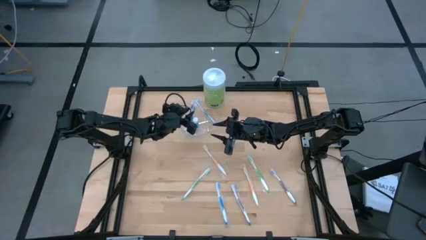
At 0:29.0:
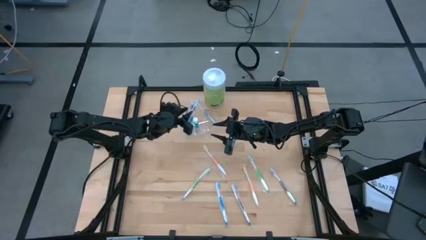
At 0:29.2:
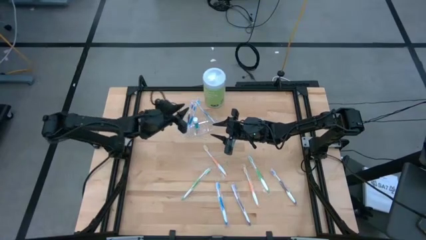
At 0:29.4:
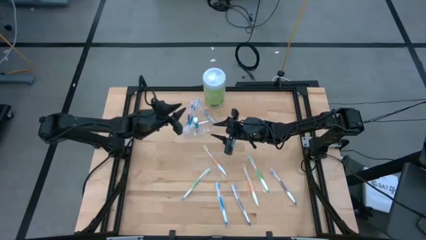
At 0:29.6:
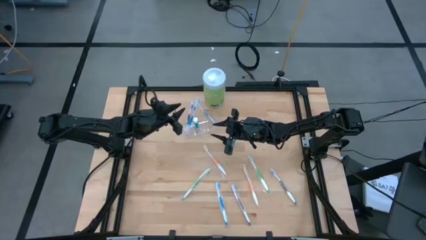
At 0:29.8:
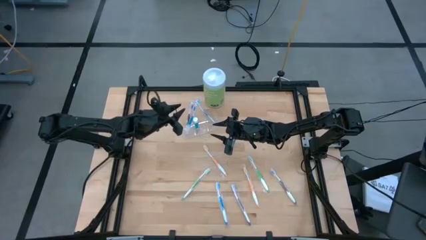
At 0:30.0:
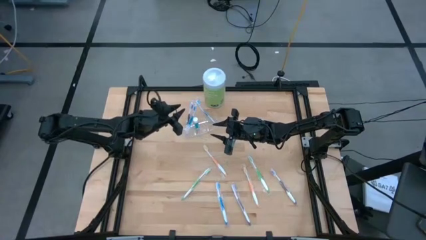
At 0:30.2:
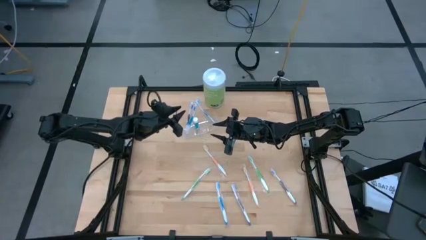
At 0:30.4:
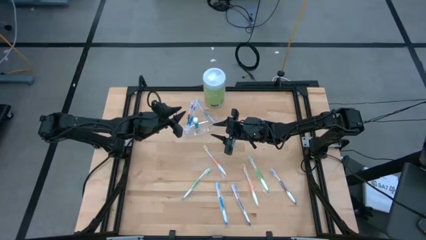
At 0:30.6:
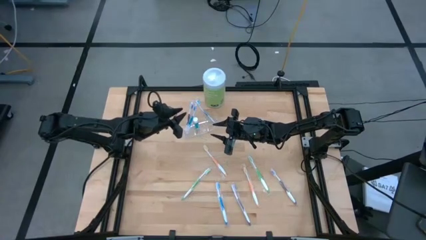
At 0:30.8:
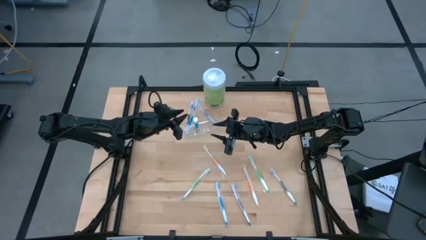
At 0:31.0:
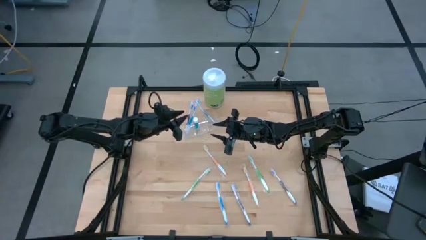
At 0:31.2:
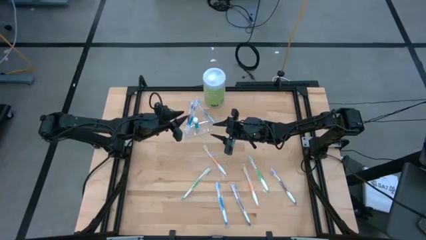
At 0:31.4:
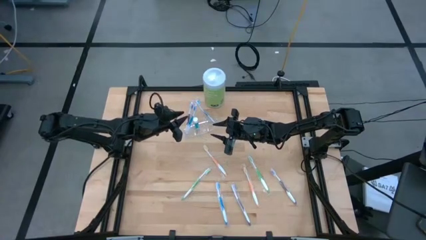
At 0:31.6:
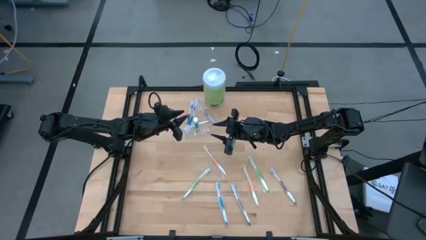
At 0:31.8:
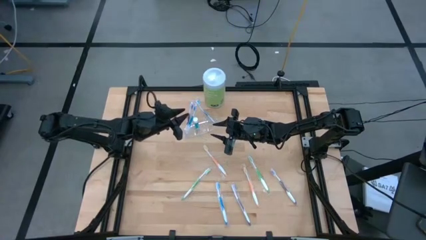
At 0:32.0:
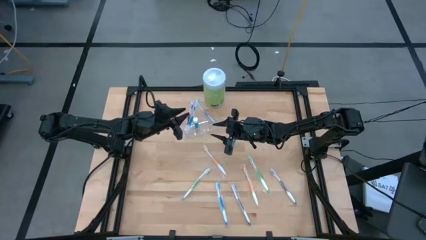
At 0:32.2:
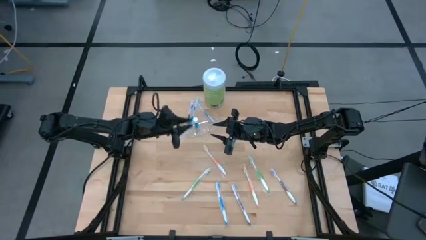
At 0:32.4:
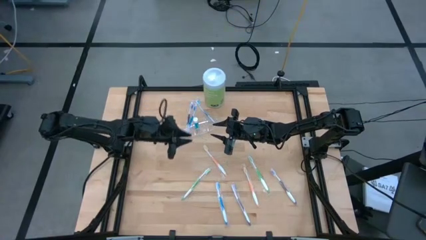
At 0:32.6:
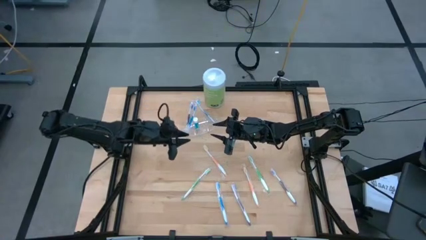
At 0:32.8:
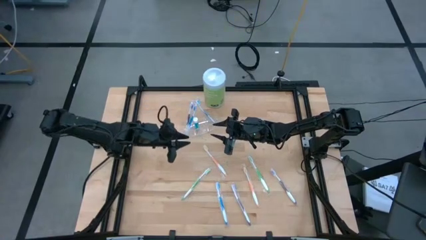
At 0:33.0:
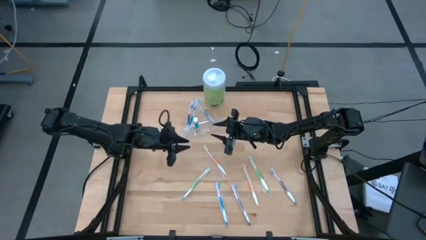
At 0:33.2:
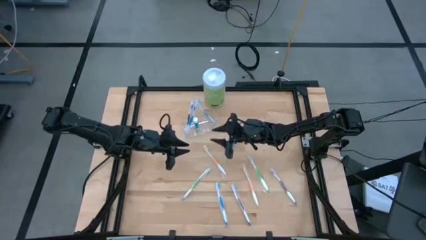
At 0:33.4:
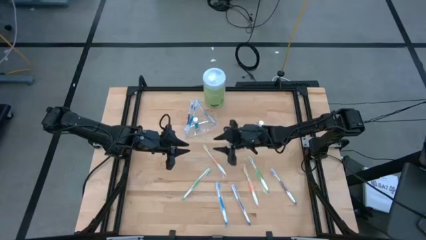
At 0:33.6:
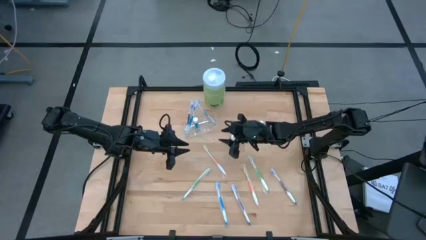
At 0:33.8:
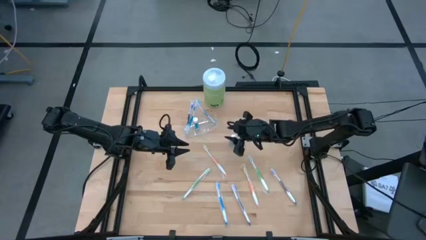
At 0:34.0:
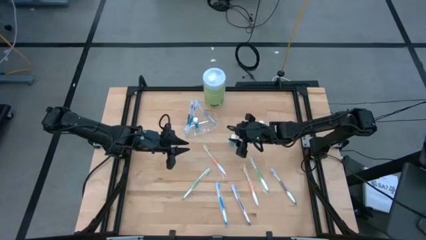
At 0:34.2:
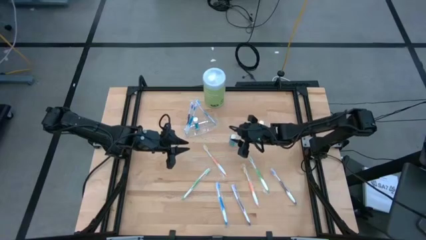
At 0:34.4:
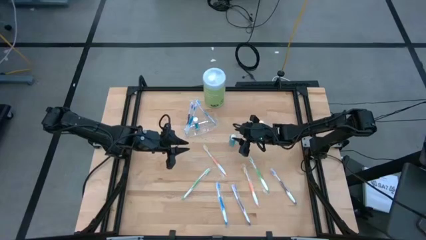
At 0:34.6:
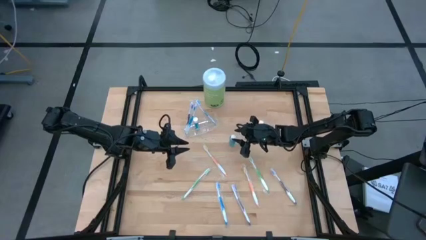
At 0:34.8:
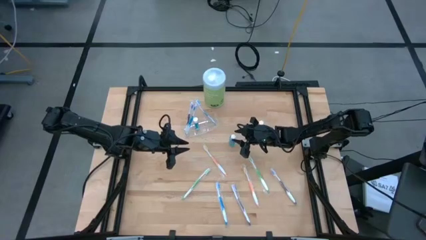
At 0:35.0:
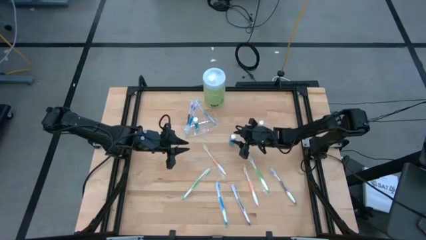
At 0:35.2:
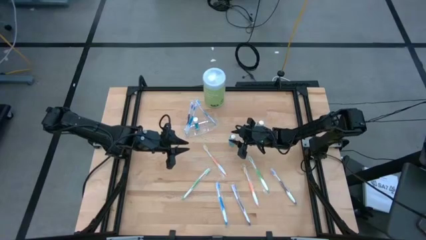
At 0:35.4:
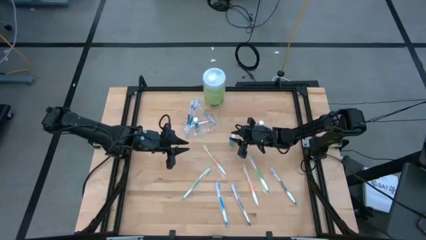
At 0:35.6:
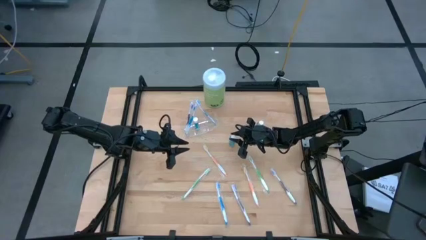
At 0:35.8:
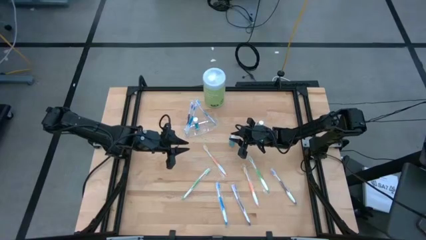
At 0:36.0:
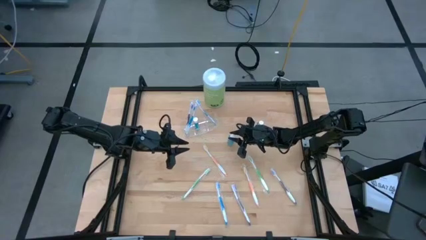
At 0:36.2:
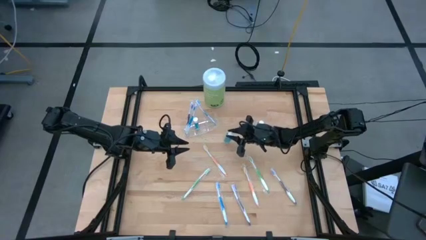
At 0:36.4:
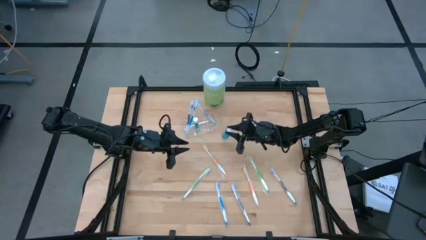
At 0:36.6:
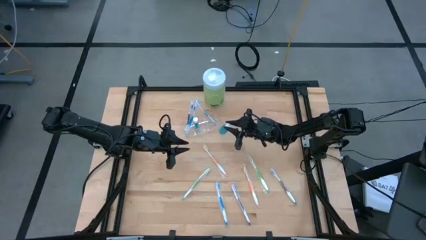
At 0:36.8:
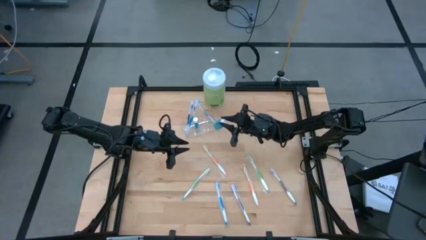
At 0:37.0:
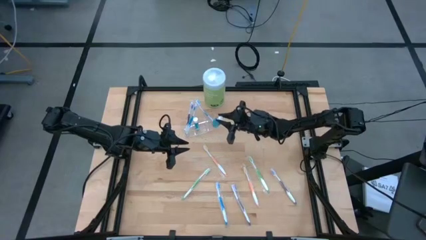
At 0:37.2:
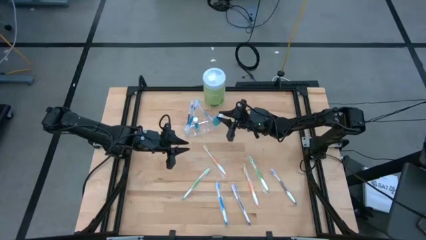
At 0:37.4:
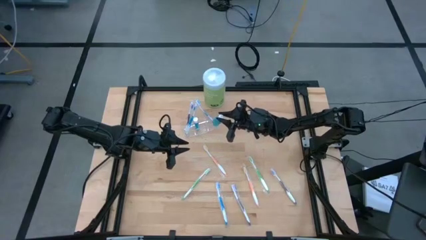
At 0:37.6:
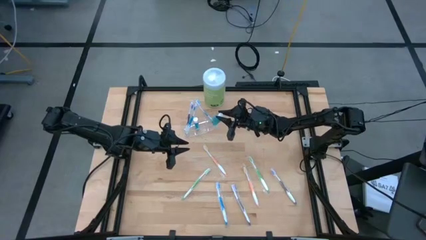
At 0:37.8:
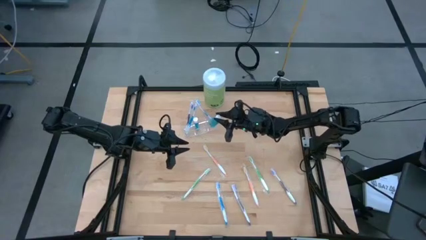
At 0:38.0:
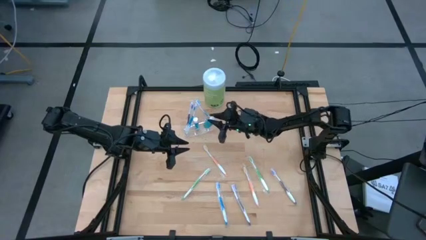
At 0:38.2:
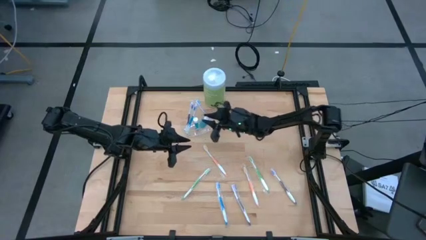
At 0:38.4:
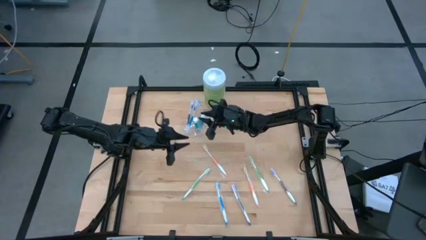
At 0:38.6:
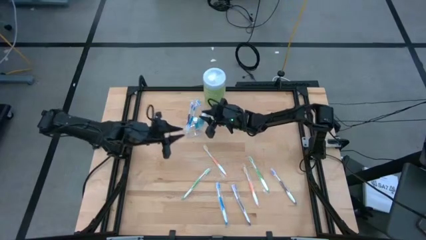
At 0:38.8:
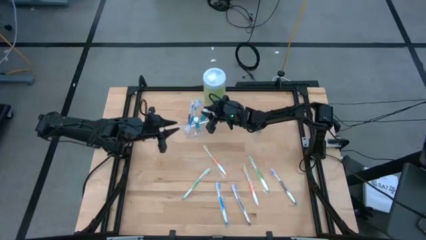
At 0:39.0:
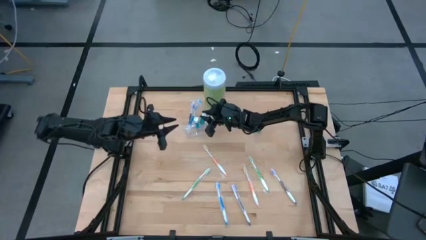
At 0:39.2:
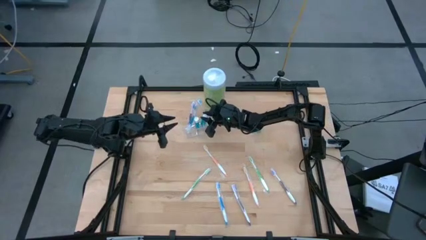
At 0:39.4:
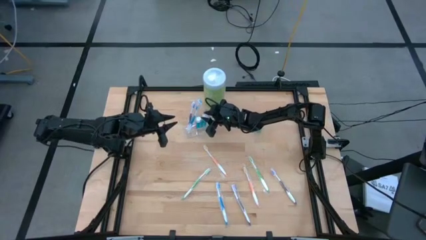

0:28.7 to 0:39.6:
Task: Pick & Place toothbrushing station
Put the bottom mouthwash into the transparent organizer

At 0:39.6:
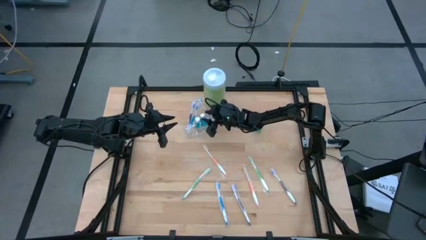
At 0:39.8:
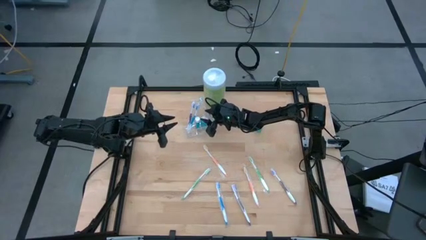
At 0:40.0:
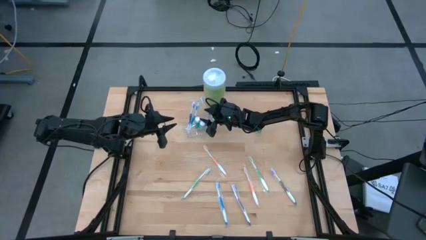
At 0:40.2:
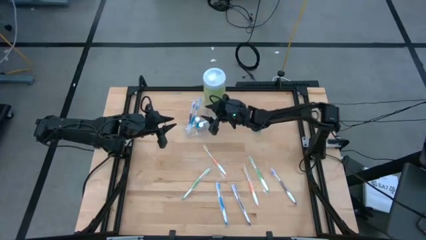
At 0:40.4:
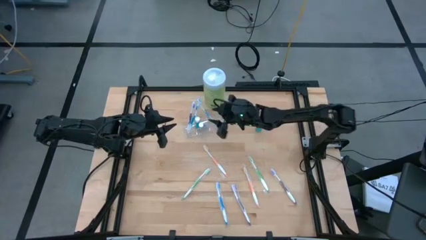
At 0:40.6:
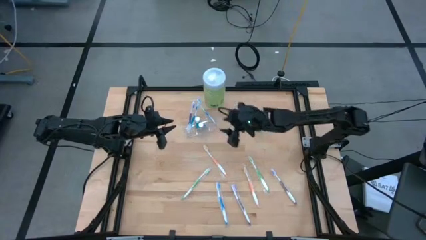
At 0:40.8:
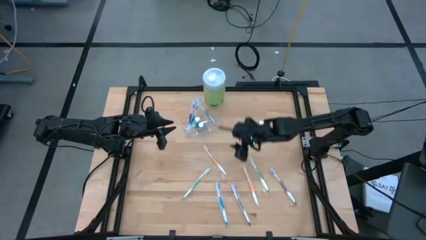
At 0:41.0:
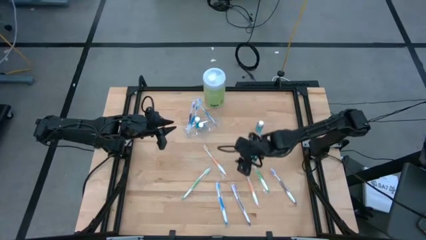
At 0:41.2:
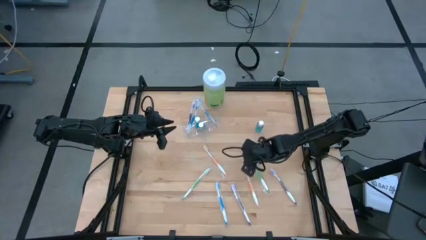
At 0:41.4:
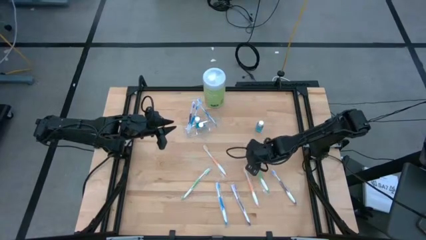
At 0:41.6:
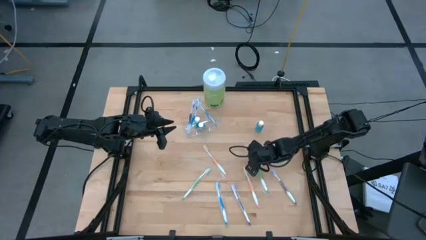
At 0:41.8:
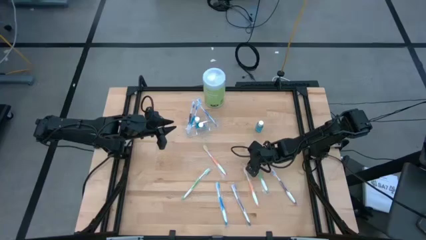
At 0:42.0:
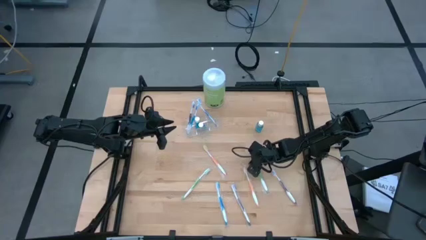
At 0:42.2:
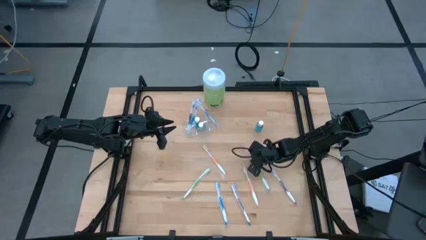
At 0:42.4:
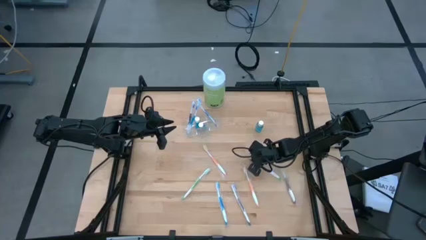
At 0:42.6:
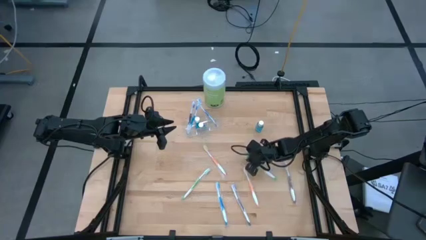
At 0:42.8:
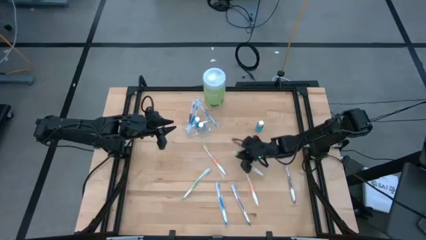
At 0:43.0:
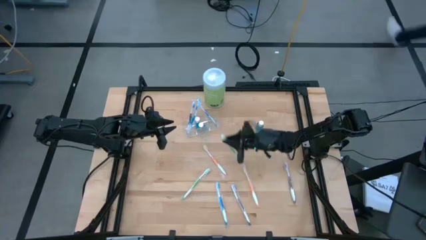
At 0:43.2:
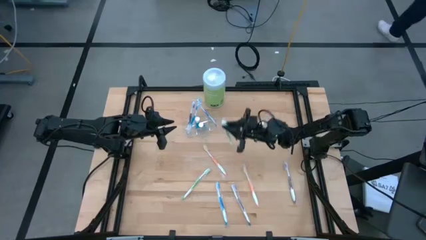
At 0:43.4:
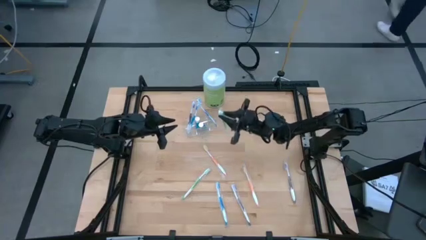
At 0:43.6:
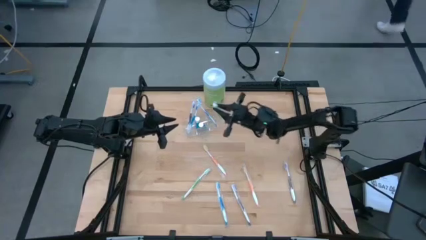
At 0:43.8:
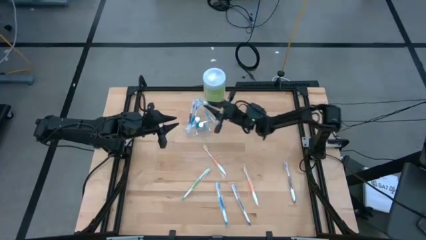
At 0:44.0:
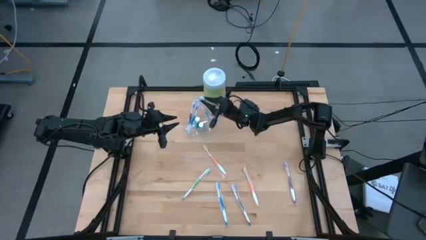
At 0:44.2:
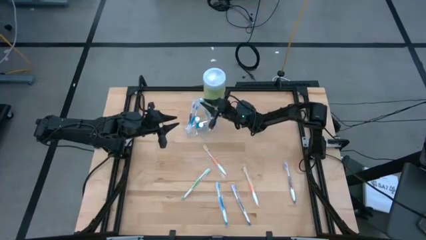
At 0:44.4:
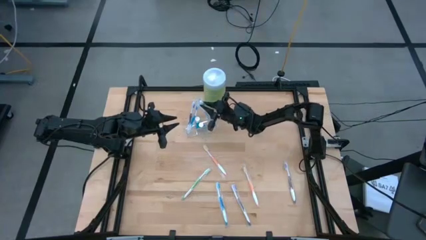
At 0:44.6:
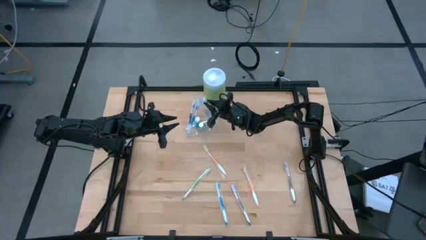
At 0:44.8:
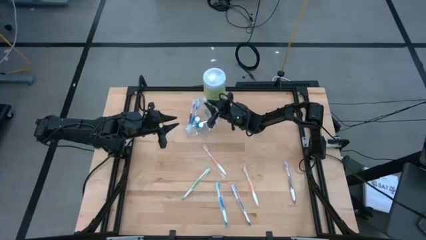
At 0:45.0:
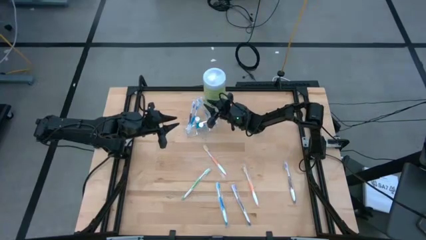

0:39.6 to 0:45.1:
Put the right green toothbrush into the transparent organizer
